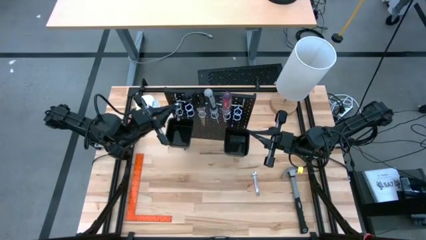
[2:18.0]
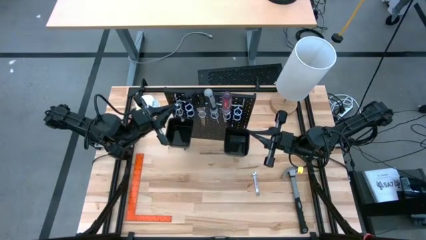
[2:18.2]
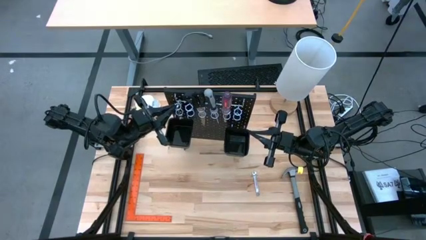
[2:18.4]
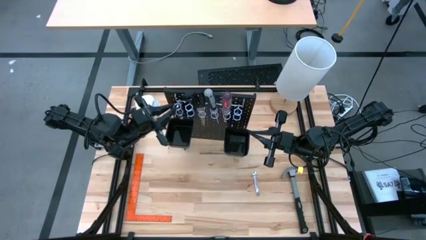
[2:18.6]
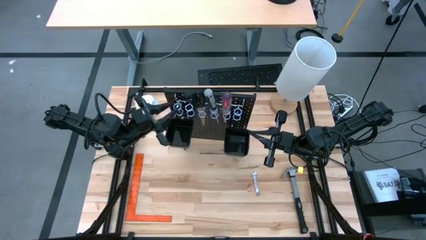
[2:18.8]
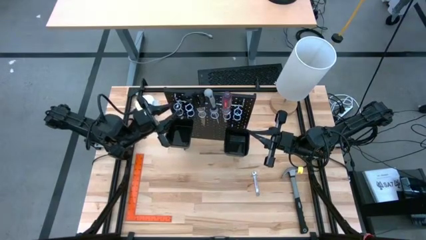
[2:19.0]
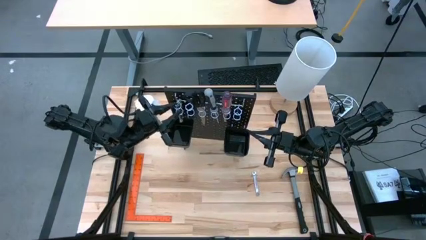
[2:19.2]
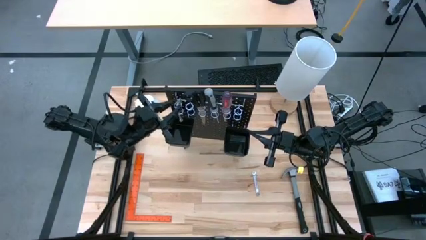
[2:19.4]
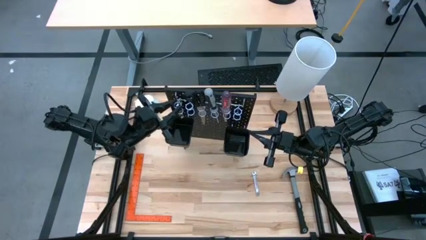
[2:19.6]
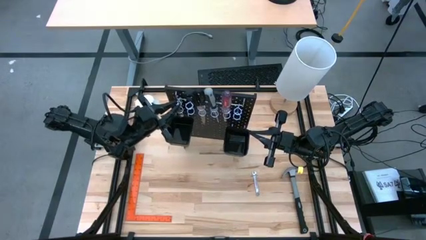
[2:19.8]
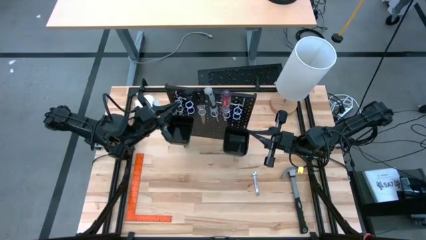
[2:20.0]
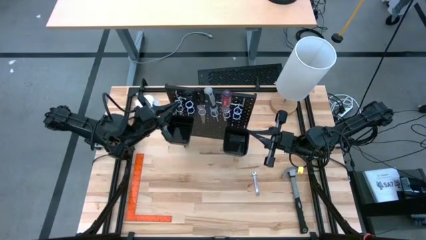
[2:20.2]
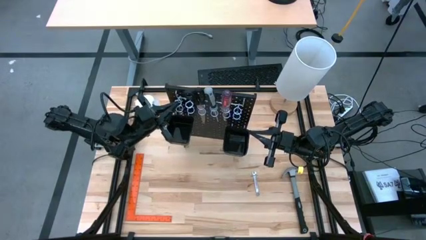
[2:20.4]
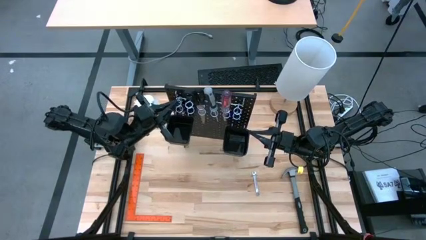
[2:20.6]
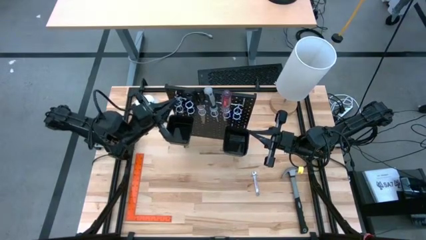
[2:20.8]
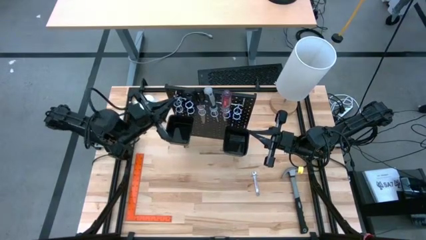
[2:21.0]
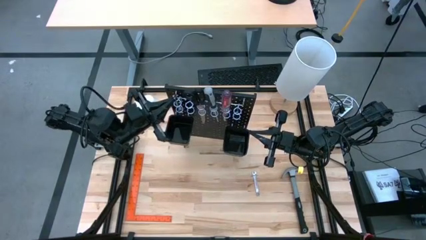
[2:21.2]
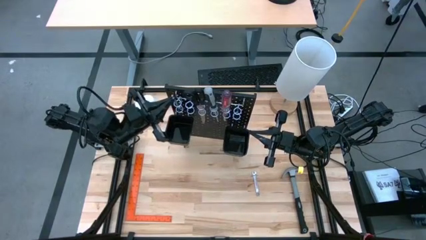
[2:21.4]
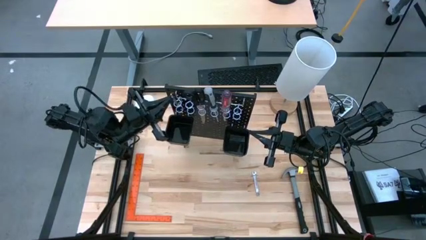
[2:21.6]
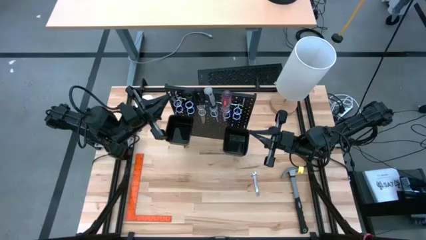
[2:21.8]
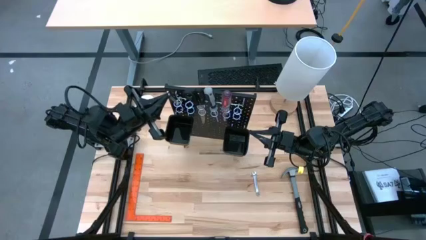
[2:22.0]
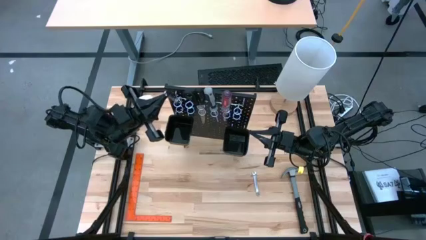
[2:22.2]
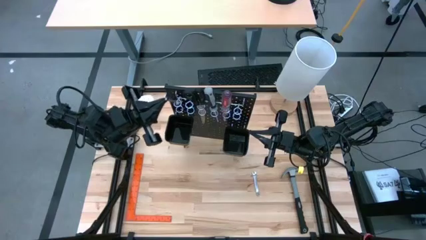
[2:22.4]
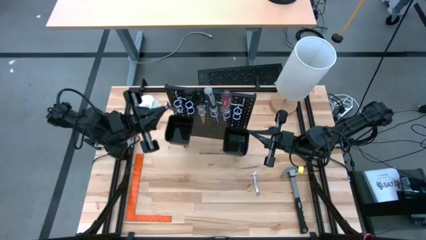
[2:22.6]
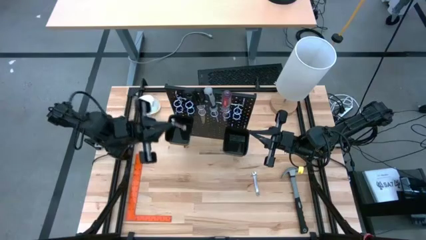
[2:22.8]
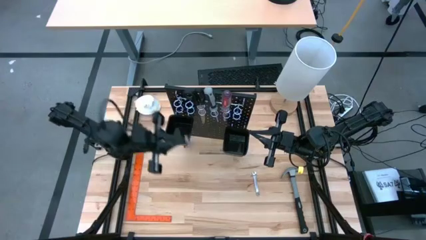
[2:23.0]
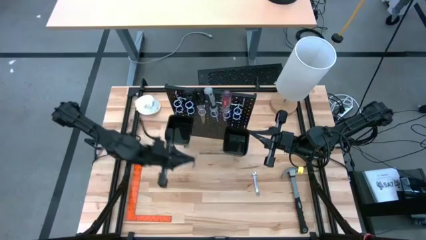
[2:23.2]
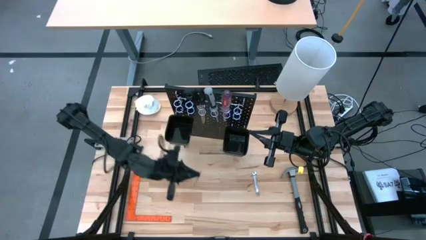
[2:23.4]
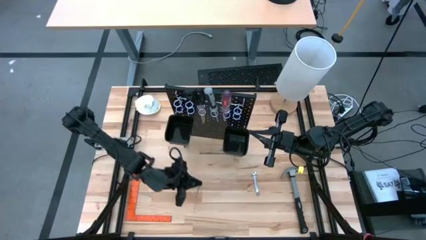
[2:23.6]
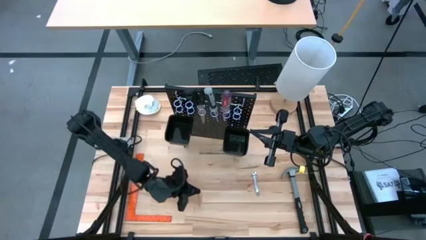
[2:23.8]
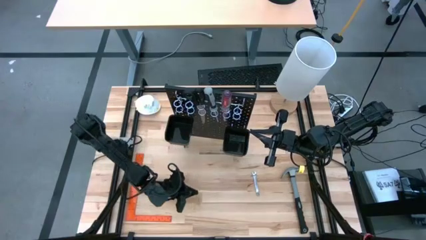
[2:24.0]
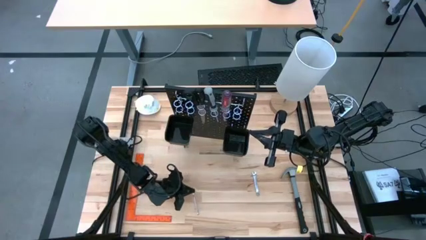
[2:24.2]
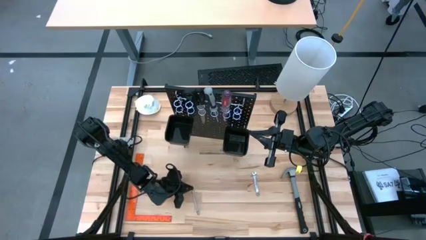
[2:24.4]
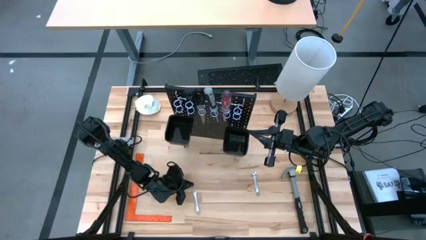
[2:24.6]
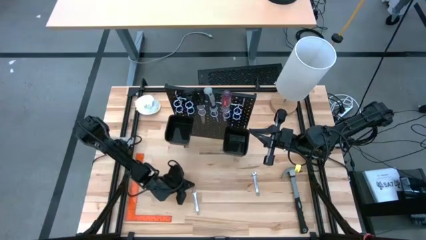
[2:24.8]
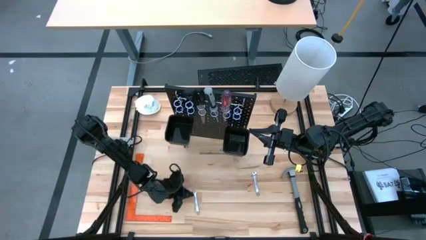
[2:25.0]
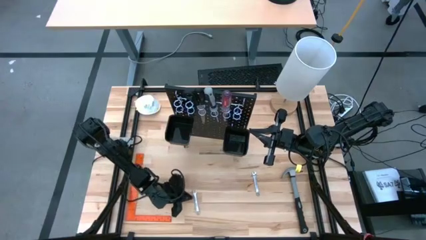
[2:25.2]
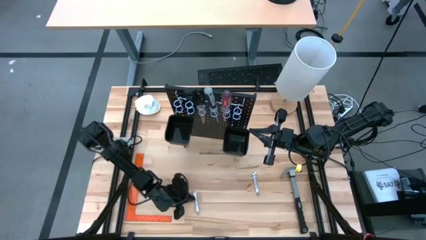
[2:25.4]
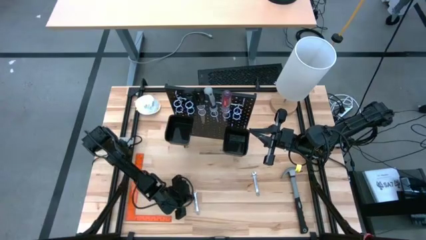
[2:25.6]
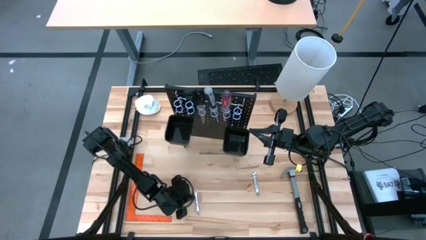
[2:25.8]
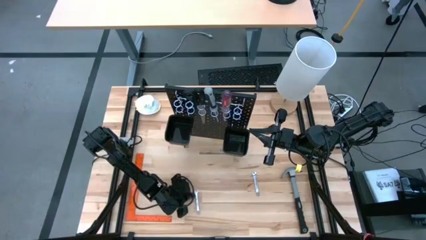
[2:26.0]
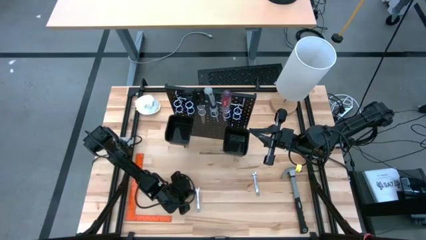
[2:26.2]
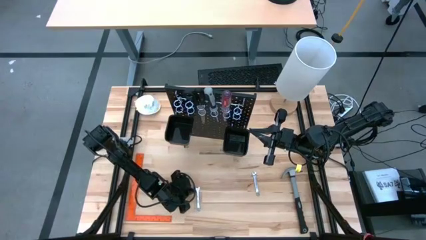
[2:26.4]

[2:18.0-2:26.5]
Task: Hang tools onto peg board
Remove the silver wrench from the black peg board

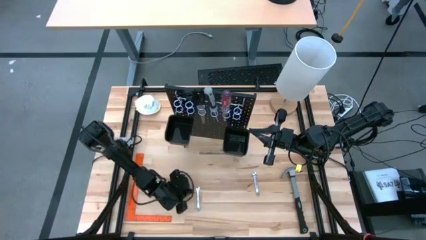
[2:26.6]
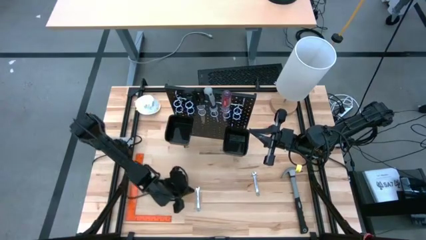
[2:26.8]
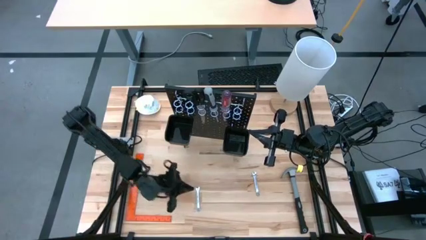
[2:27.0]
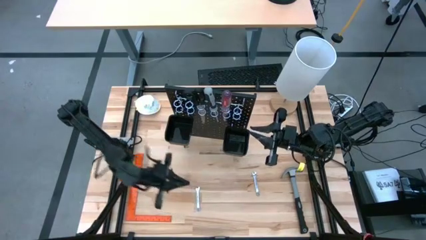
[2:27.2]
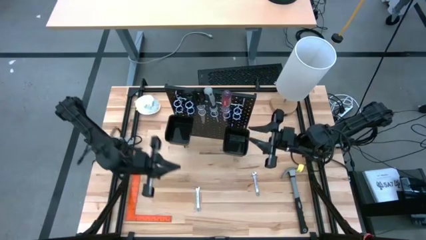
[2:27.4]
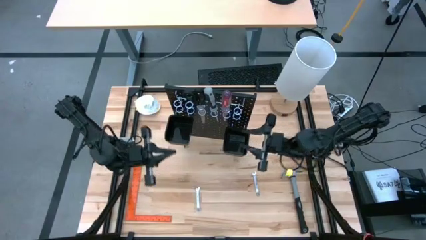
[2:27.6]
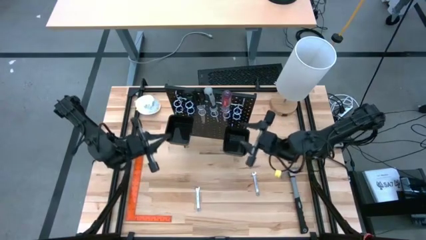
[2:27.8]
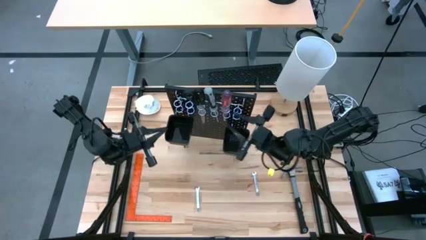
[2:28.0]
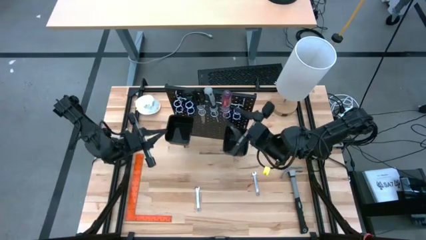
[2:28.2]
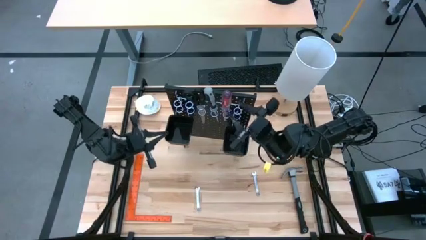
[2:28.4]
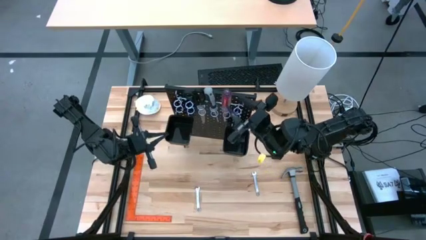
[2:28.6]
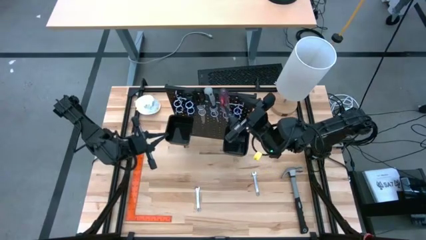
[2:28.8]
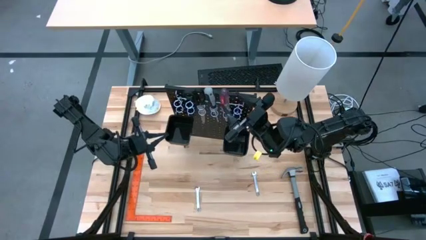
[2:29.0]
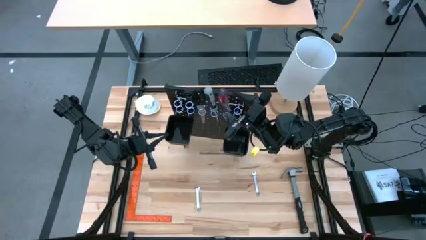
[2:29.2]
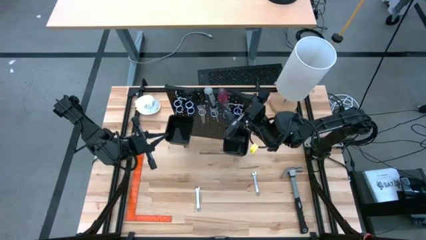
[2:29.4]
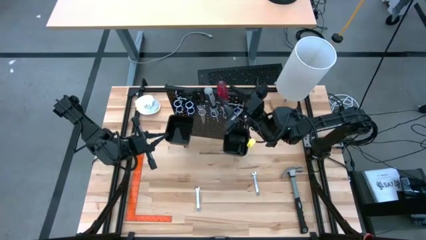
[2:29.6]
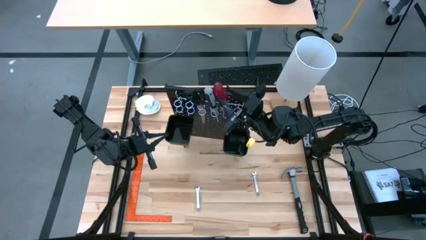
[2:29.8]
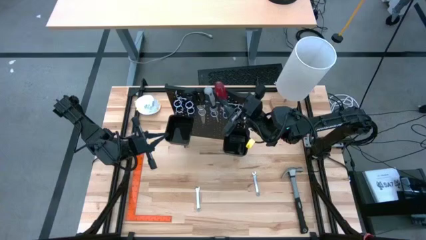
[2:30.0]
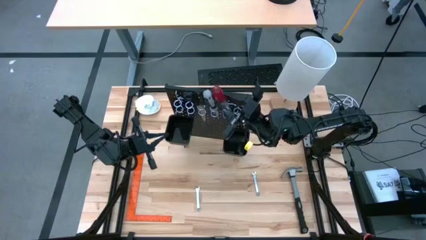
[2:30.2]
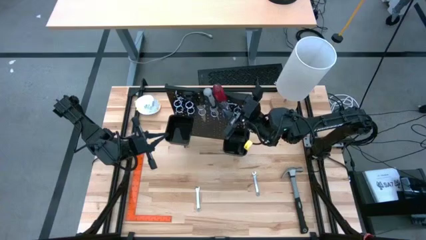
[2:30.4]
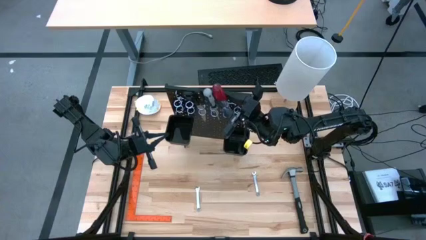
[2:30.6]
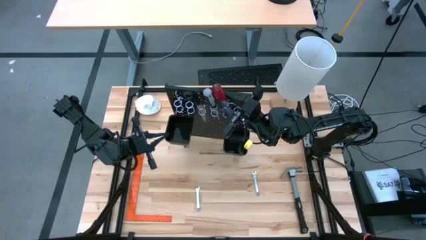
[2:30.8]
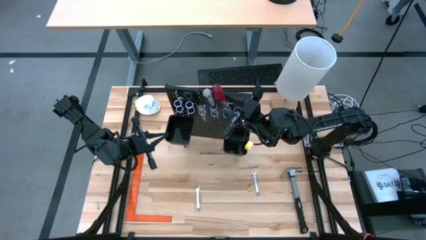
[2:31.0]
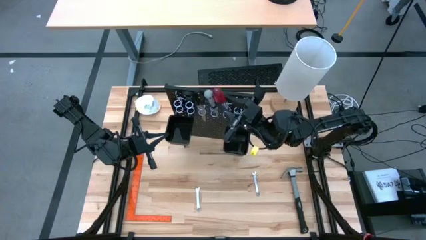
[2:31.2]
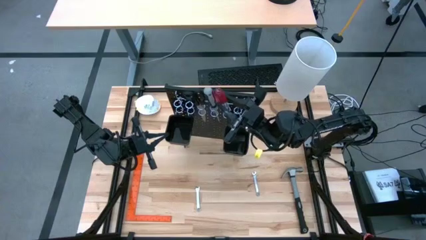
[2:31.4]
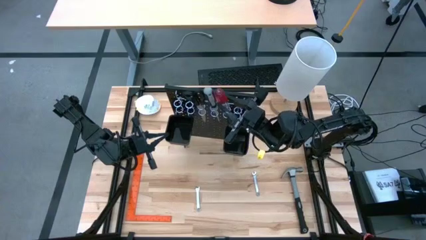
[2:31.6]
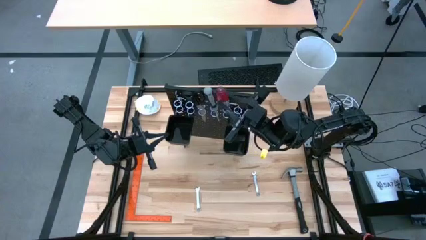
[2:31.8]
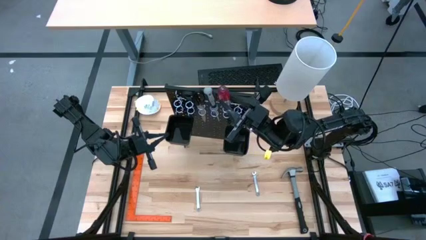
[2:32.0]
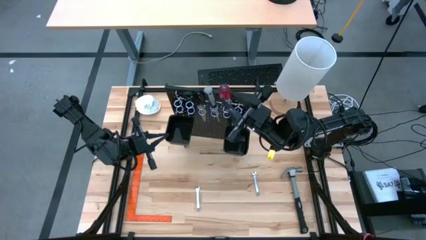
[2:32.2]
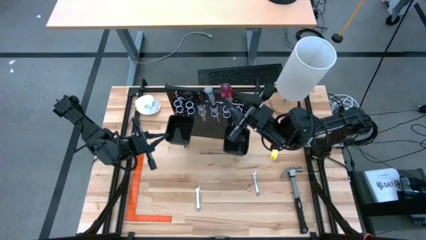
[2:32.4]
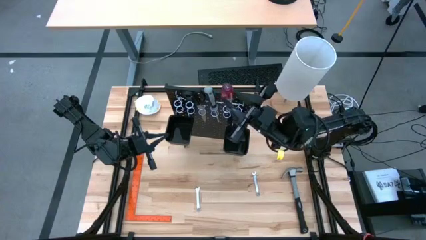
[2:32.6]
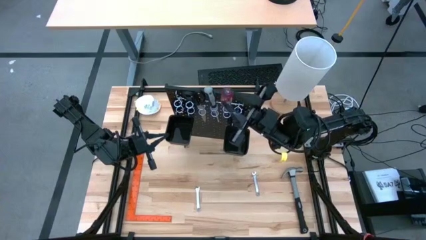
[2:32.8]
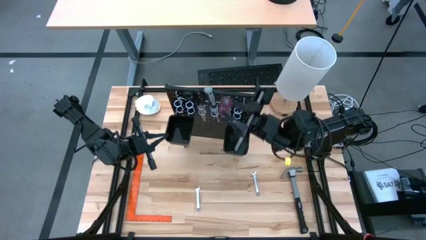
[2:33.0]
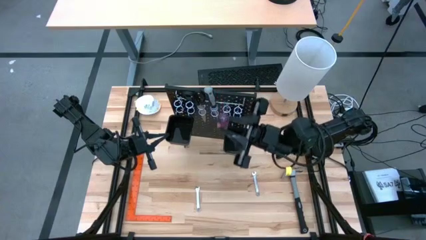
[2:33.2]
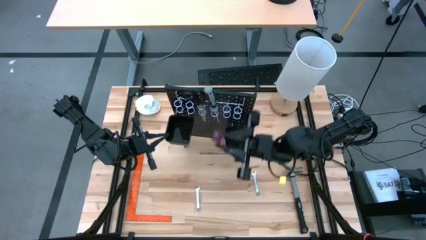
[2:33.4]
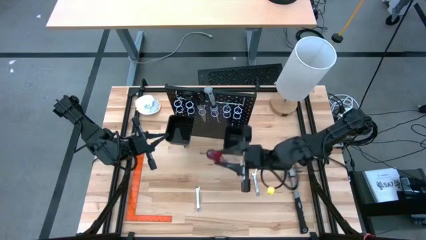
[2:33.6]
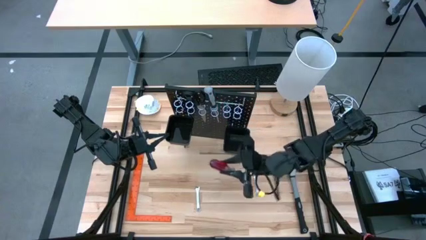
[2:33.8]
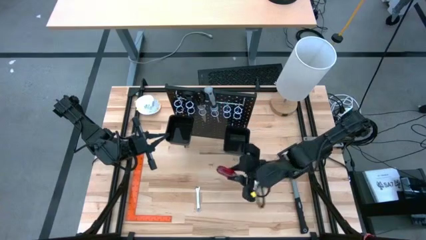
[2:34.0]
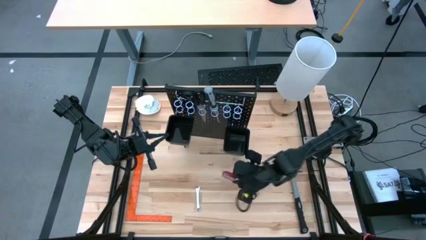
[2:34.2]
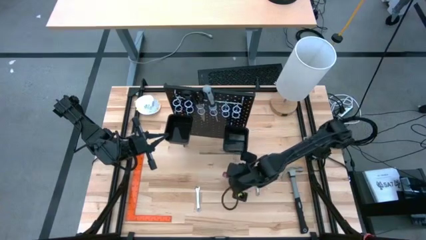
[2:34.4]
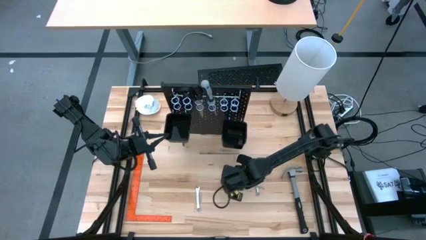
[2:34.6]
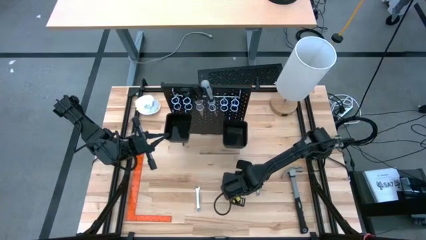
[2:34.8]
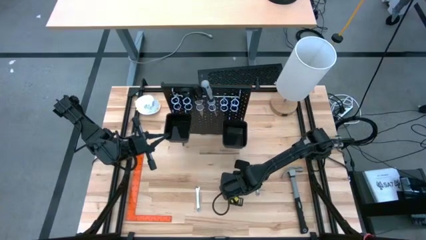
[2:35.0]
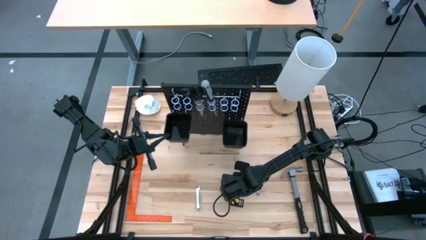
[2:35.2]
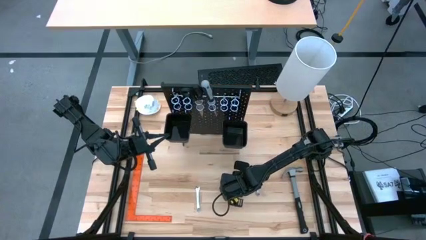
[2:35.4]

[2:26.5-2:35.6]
Remove the red screwdriver from the black peg board
